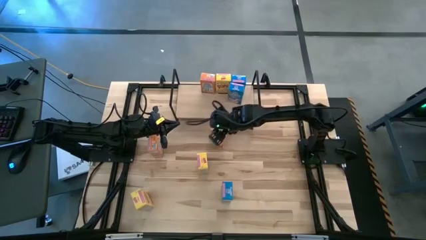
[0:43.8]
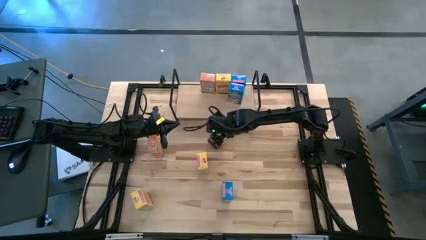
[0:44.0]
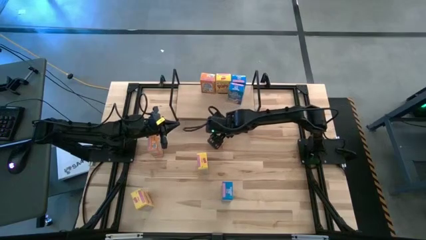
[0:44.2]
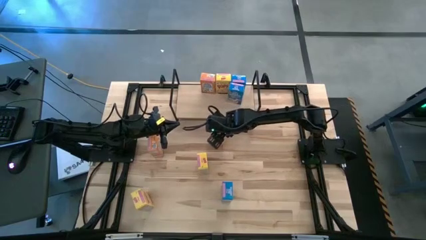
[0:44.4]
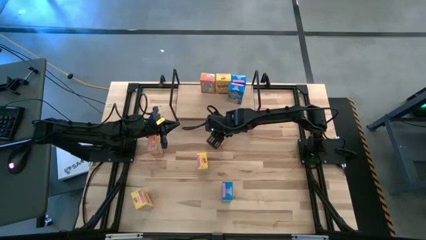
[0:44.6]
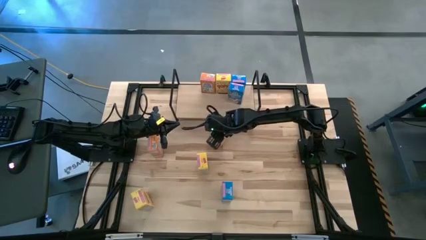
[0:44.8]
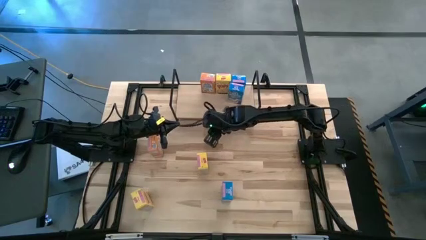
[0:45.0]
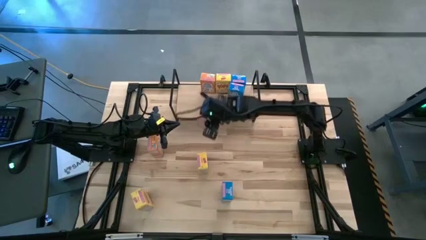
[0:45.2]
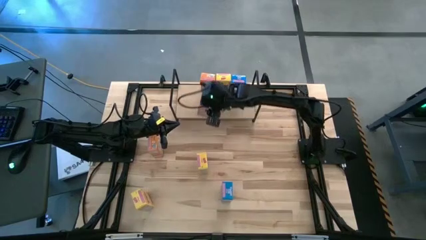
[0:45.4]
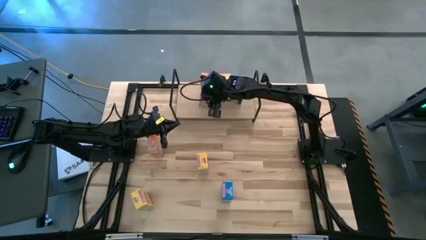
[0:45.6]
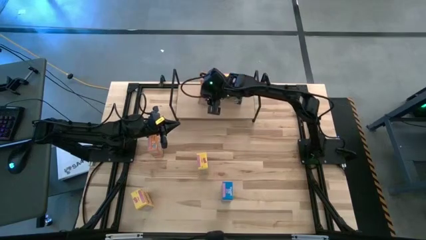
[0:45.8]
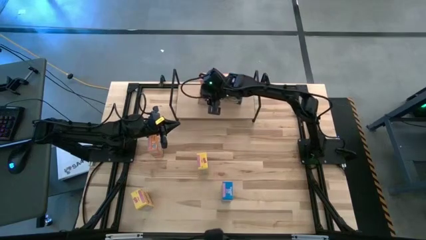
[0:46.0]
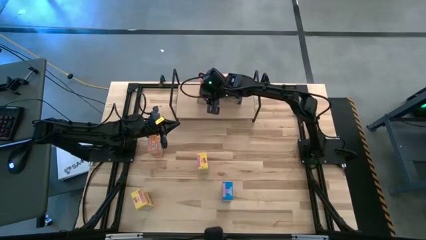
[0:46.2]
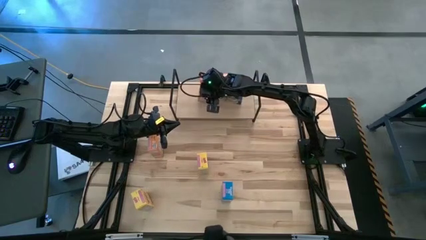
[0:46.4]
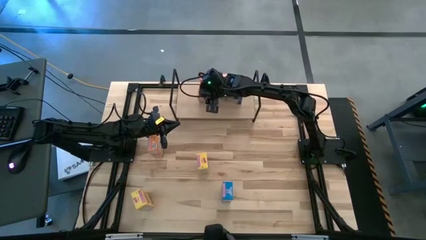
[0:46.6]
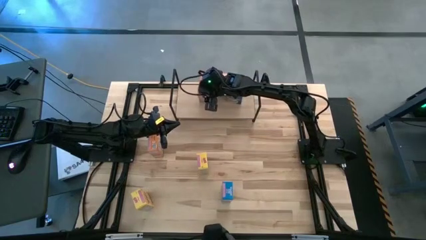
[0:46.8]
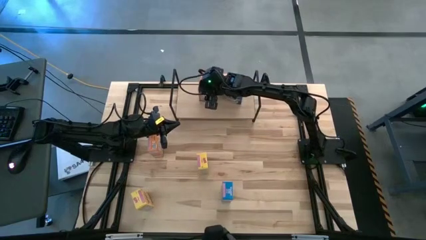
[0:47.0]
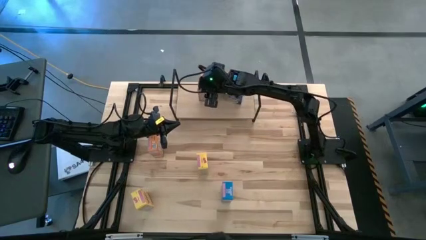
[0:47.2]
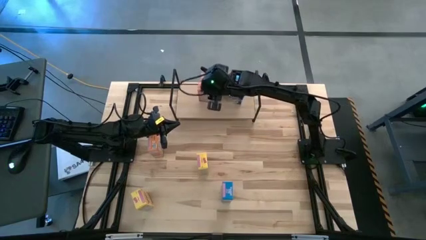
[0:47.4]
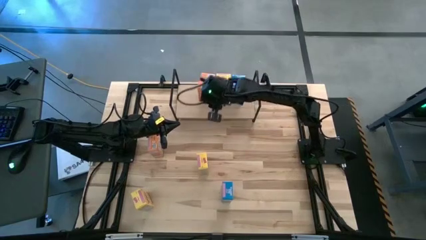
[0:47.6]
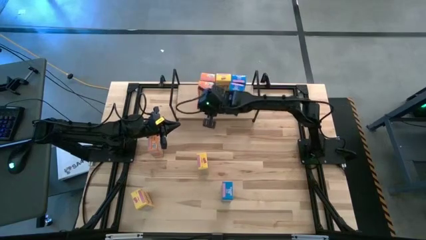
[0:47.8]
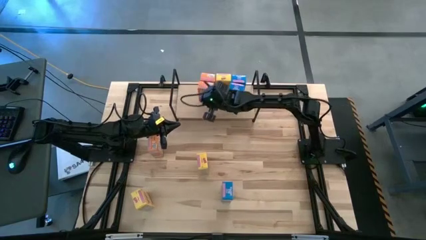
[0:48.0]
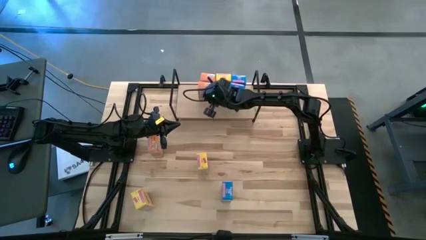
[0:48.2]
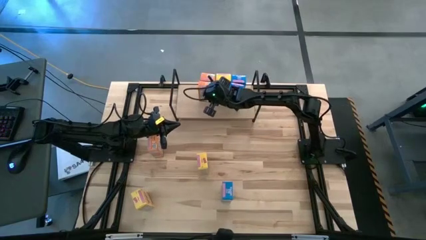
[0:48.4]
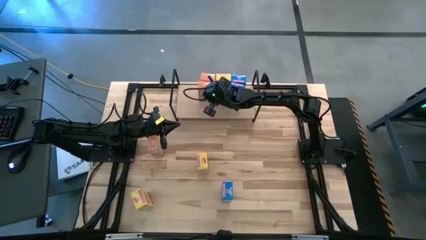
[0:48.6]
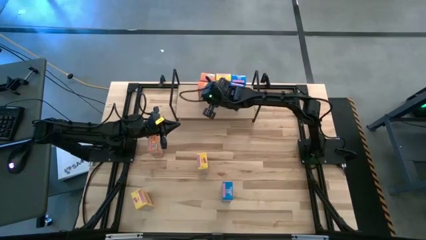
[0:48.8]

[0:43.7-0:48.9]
Task: Stack cereal on shelf
Put the right orange cereal box aligned with the other orange cereal box on the shelf

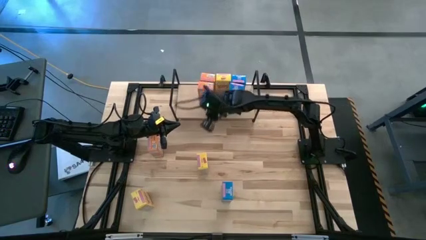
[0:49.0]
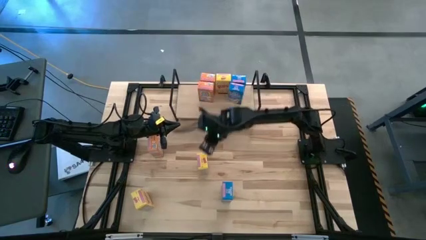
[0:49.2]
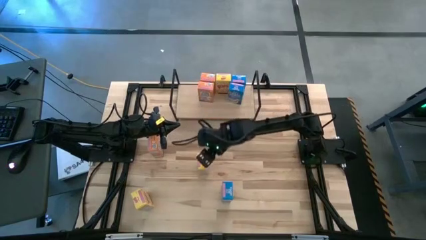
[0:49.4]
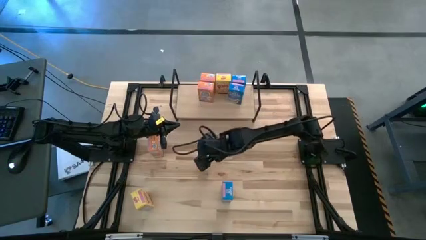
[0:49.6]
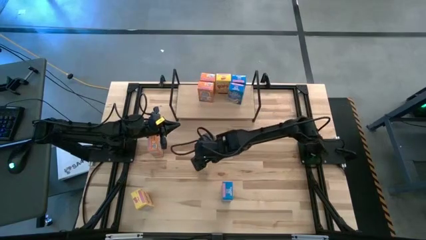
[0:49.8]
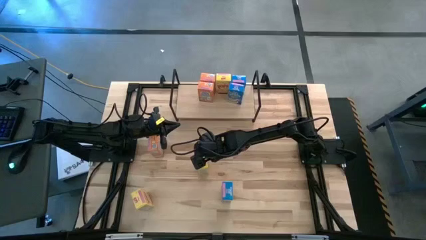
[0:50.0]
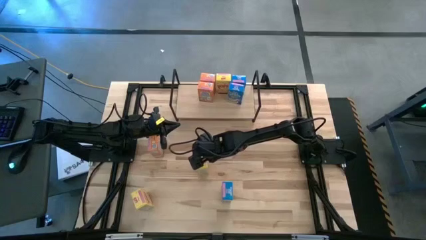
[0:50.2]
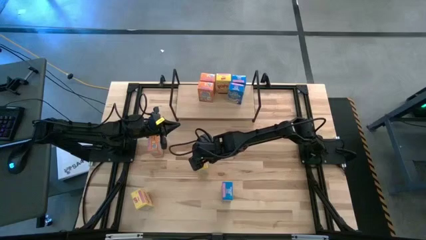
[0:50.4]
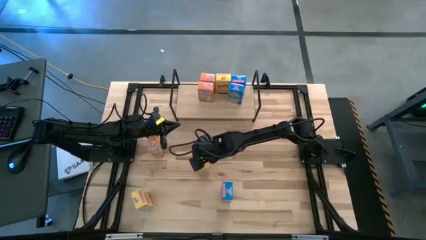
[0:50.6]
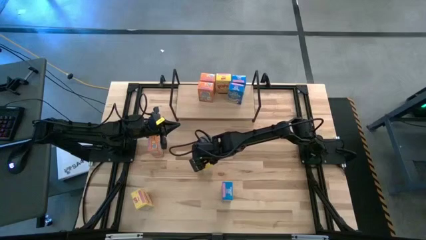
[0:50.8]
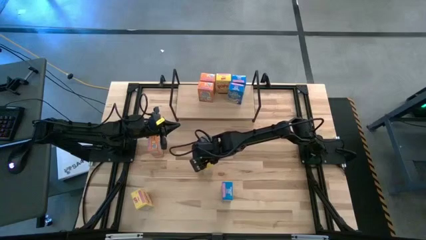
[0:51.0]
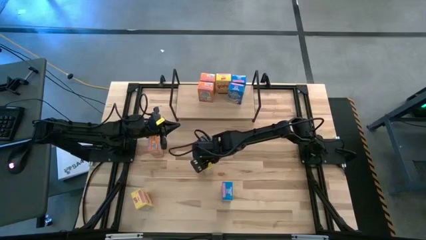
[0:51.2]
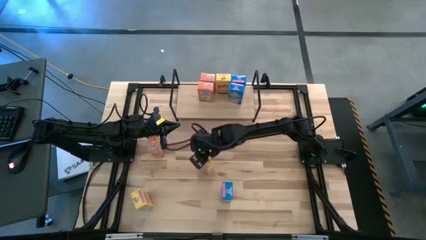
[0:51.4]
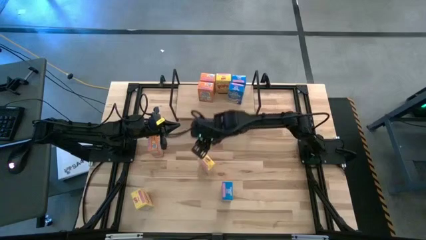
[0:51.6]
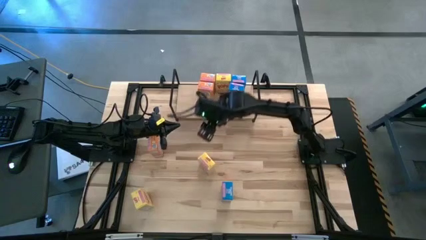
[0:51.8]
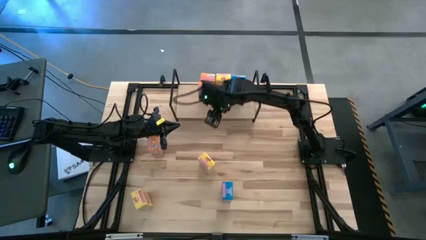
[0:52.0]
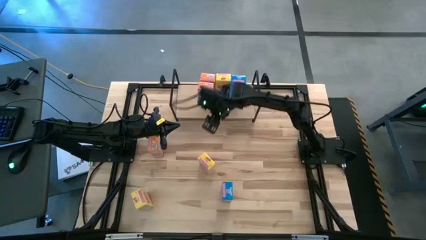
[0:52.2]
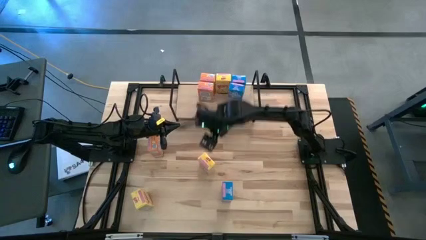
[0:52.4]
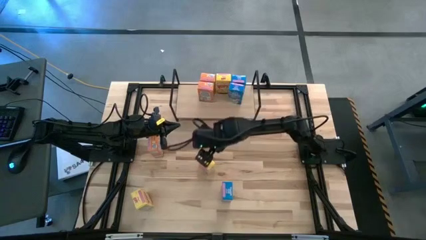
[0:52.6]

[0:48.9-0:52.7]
Put the top yellow cereal box aligned with the other yellow cereal box on the shelf

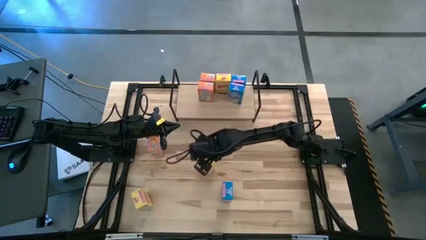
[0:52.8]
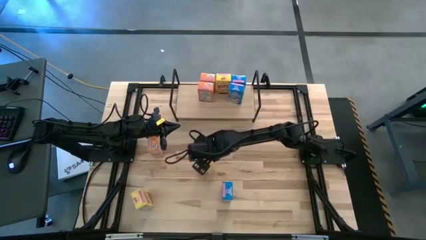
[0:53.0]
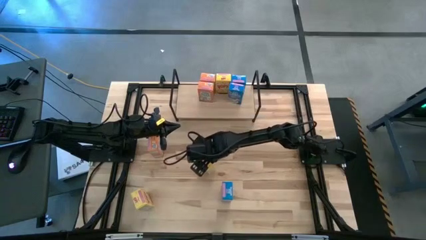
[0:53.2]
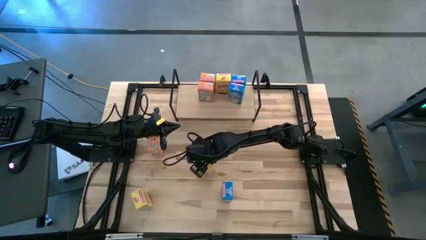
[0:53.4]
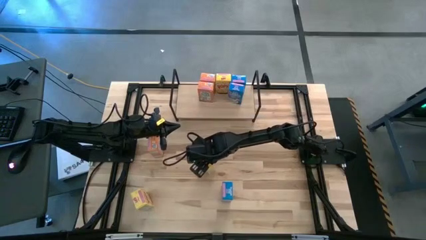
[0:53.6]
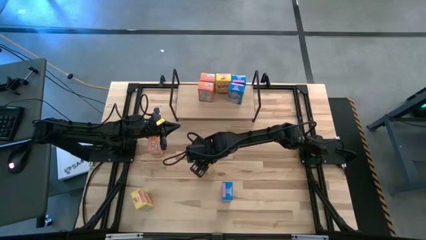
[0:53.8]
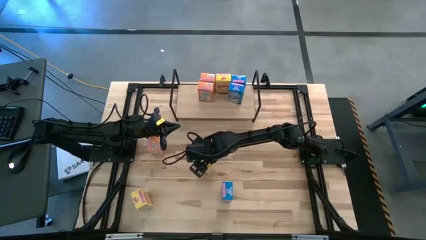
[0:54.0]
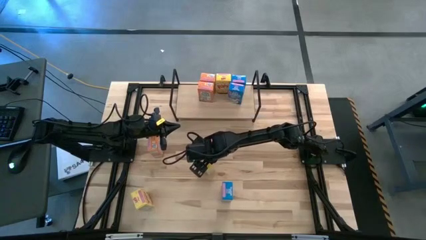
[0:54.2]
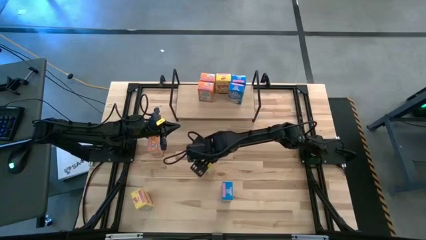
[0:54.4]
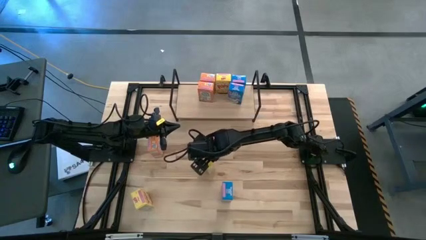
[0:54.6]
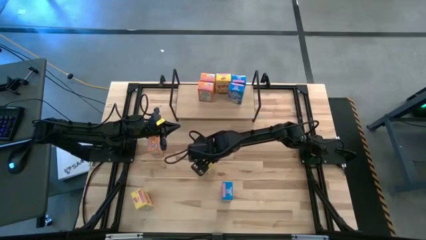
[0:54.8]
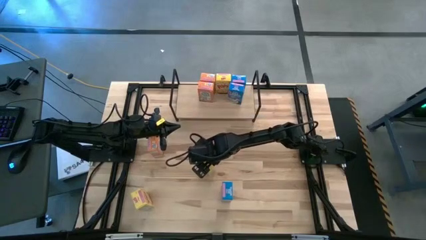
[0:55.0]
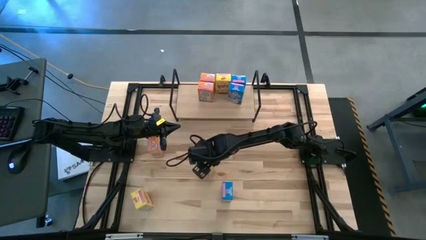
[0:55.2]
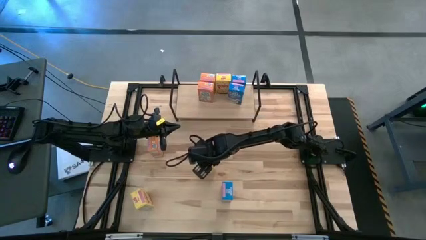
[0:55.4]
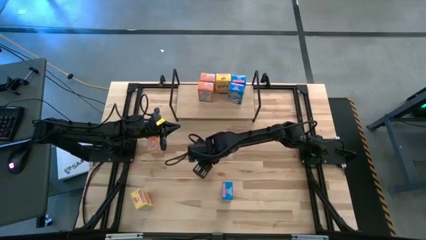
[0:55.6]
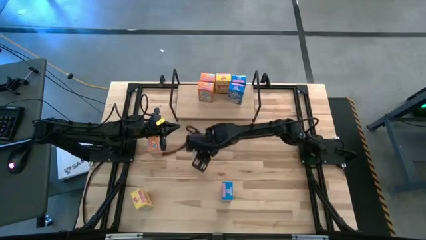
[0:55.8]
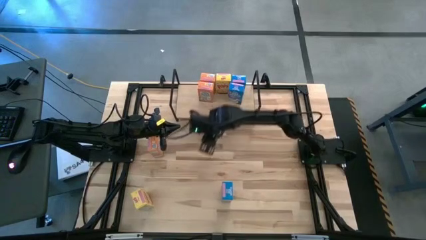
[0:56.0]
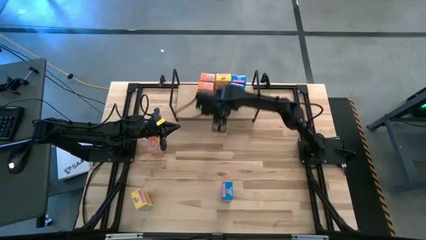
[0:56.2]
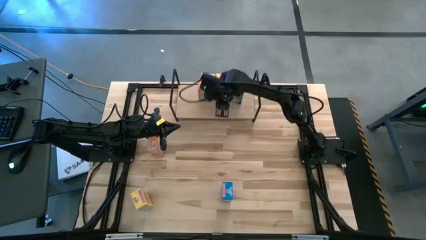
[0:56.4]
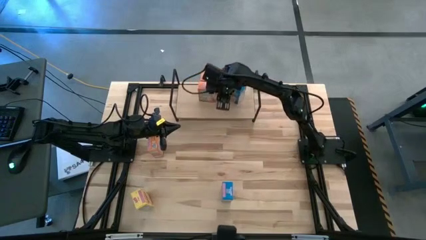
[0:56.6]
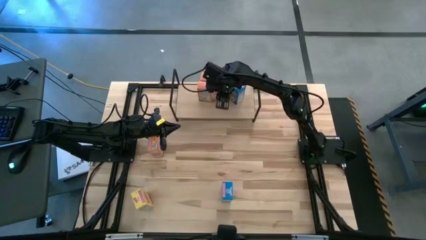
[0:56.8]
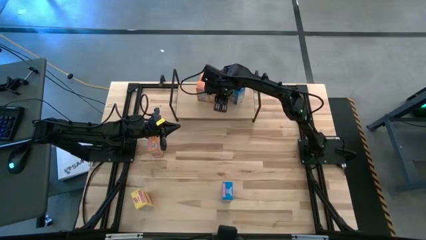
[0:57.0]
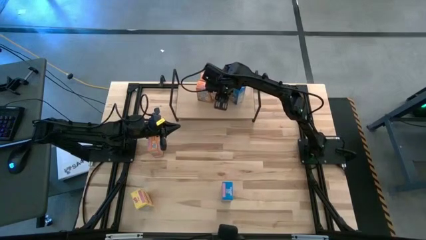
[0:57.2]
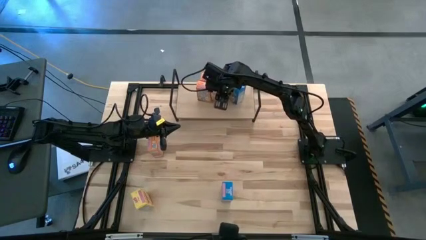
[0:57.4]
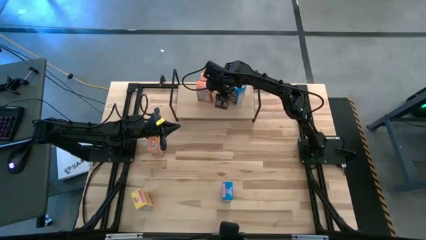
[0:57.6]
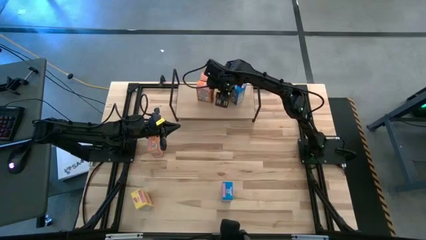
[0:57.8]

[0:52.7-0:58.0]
Put the top yellow cereal box aligned with the other yellow cereal box on the shelf
